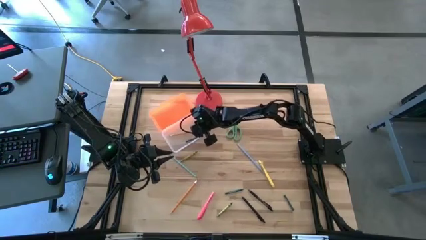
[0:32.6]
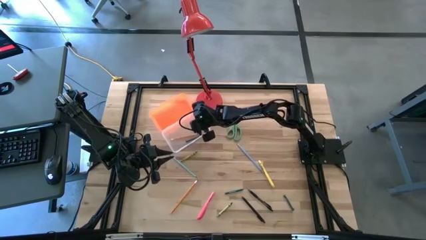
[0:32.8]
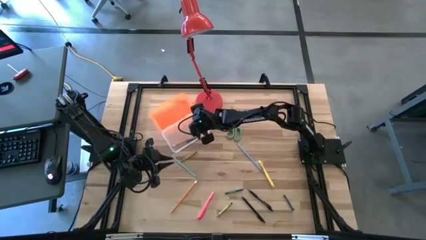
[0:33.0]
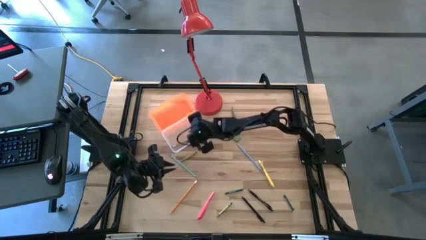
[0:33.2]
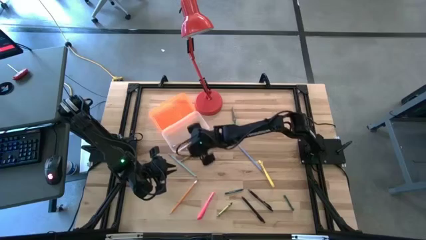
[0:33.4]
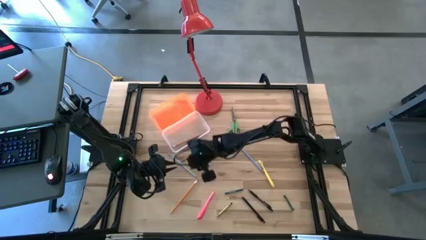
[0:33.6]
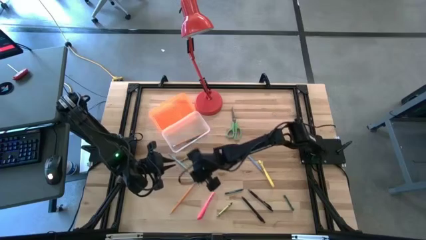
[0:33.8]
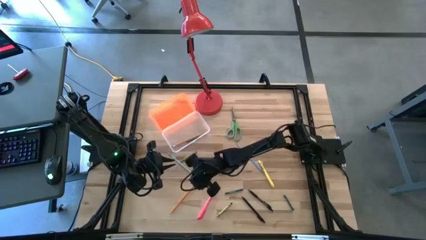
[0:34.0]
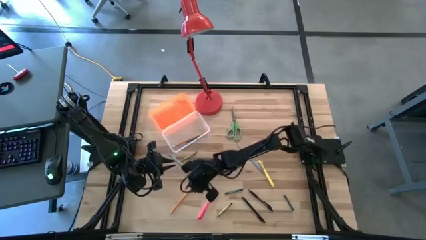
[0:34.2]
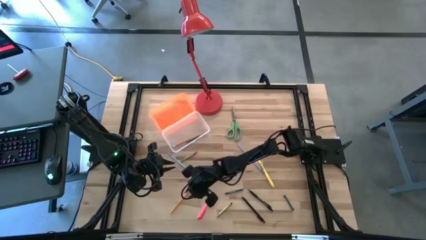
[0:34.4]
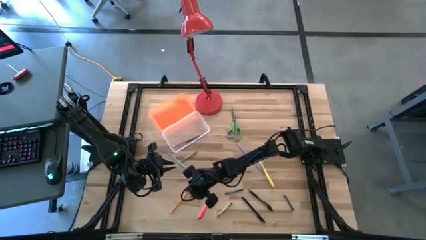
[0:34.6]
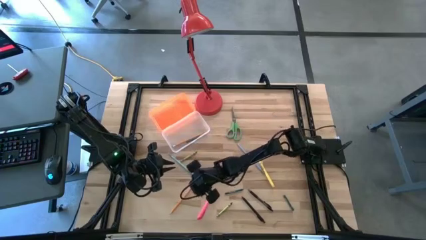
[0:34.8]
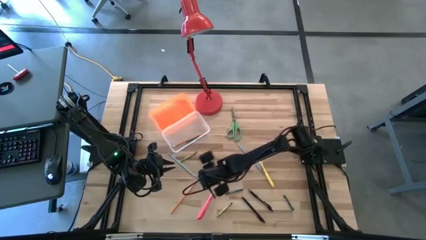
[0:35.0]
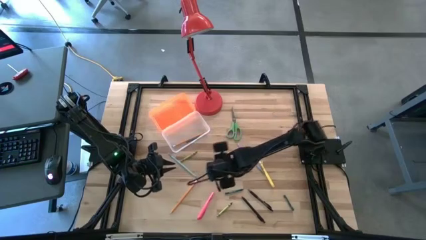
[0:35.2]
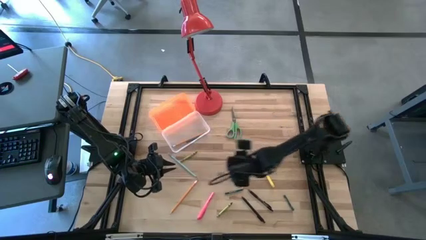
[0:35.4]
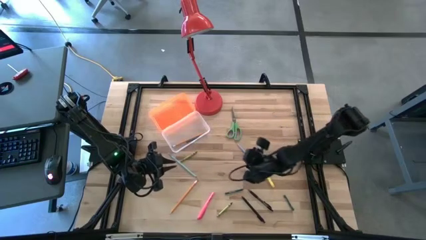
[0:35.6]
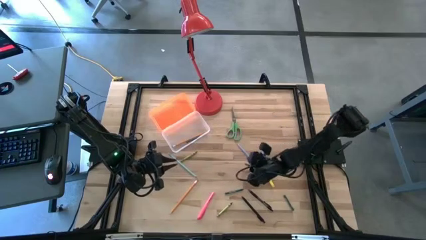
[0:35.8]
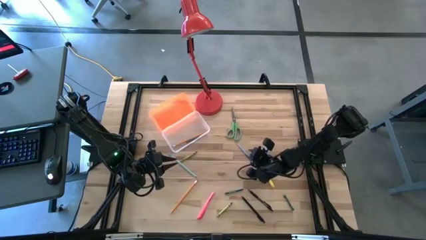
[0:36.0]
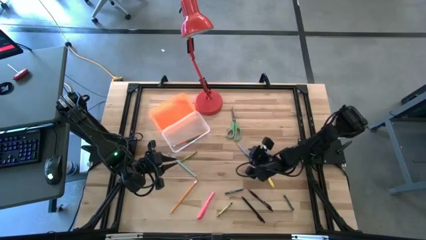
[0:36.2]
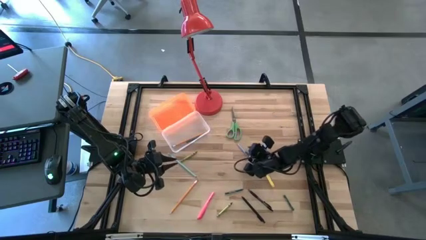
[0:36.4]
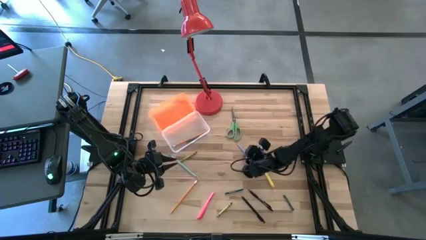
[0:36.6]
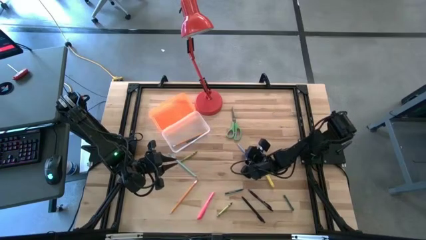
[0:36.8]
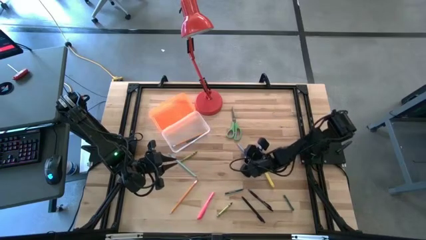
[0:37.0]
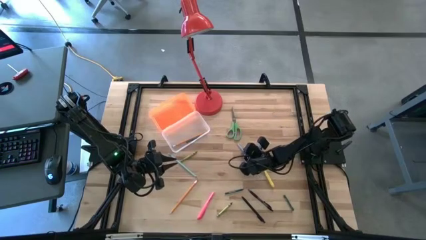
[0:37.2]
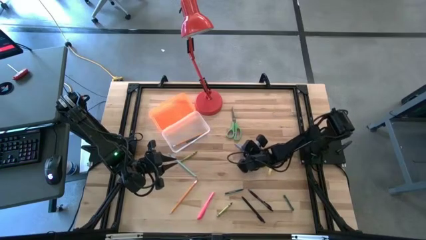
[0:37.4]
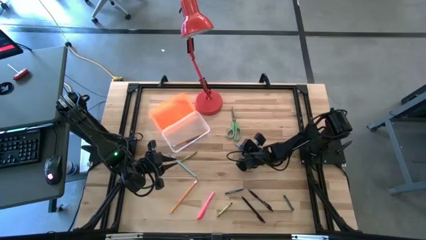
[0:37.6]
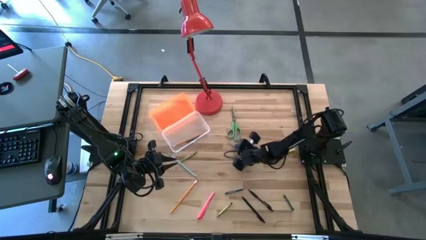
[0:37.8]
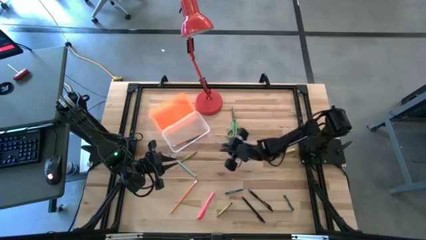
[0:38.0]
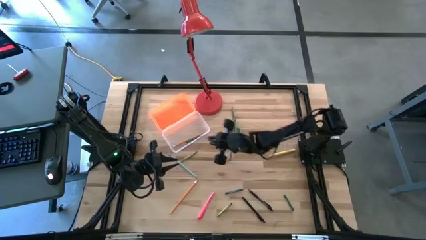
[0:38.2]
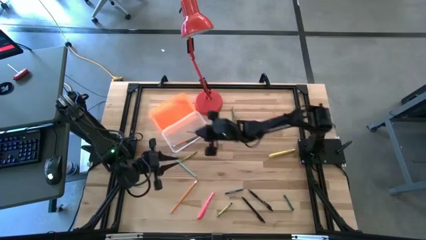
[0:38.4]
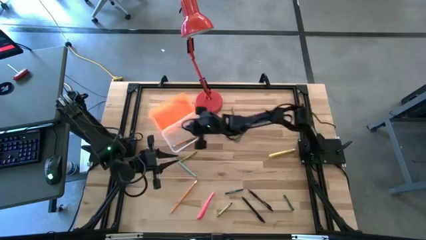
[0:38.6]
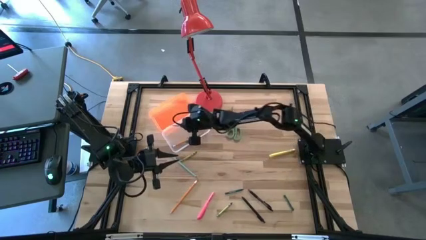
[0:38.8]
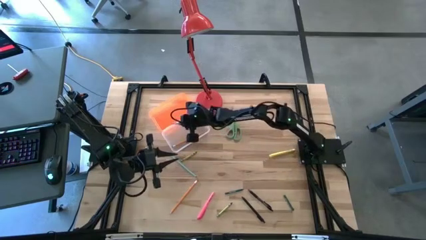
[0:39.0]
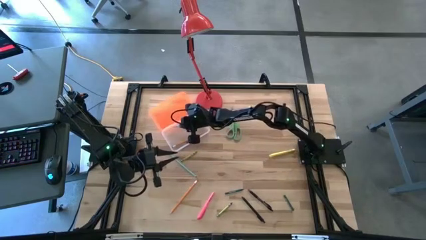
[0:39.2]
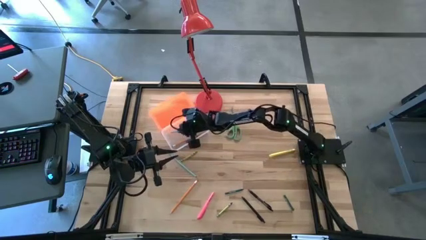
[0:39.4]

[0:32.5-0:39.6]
Task: Pick & place school supplies into a supply box
Put the blue pencil into the orange supply box

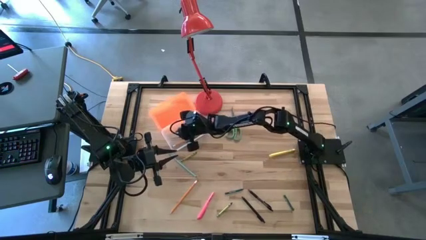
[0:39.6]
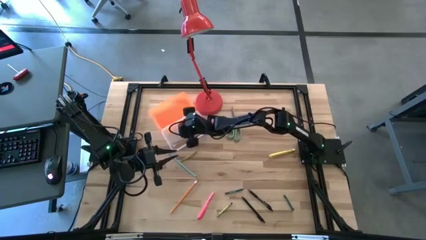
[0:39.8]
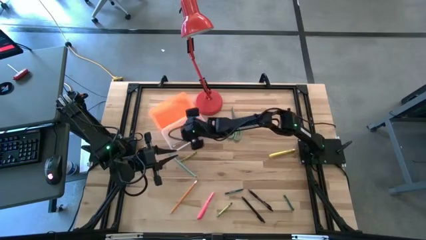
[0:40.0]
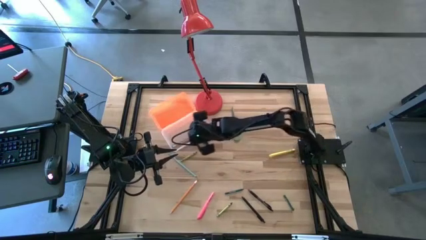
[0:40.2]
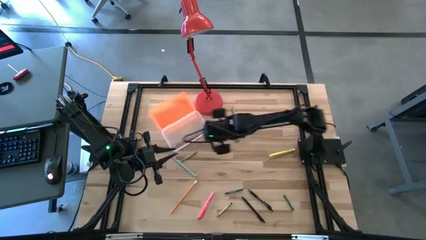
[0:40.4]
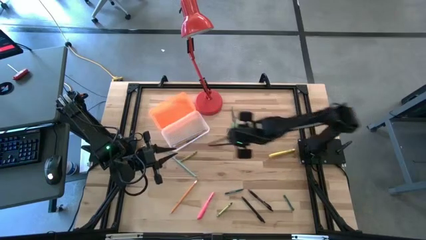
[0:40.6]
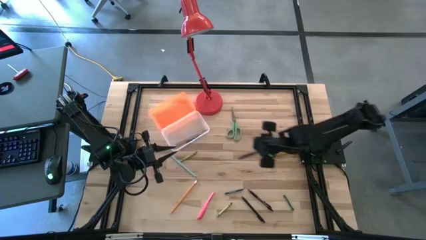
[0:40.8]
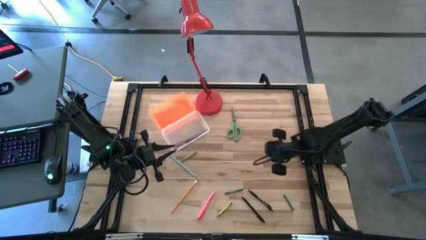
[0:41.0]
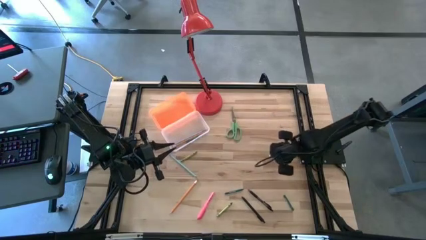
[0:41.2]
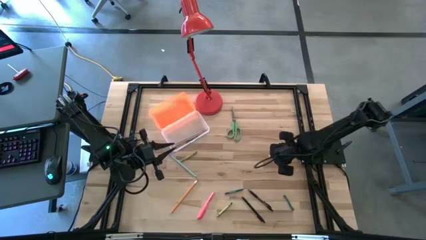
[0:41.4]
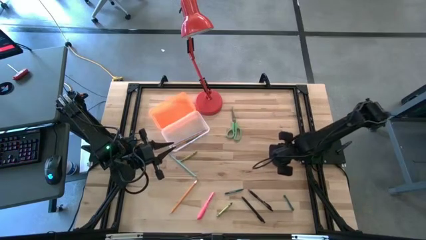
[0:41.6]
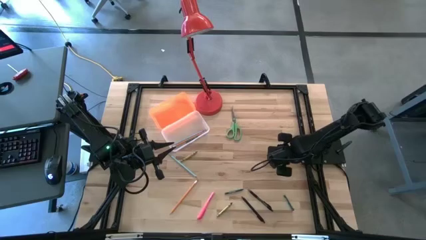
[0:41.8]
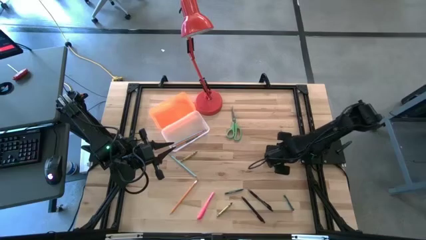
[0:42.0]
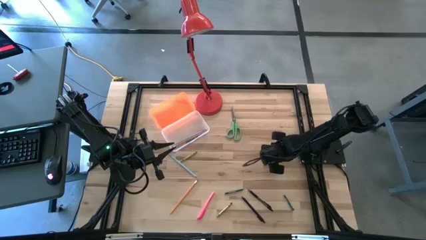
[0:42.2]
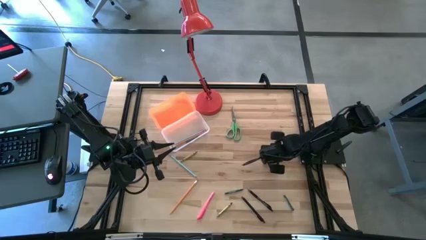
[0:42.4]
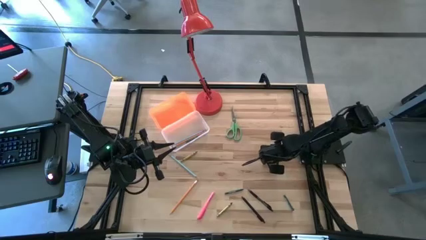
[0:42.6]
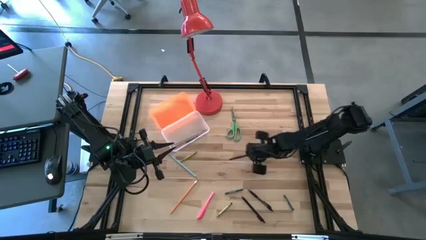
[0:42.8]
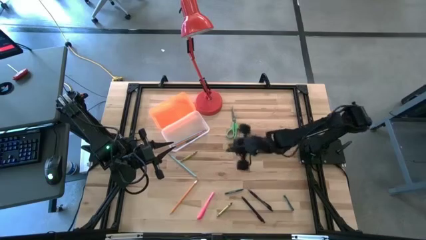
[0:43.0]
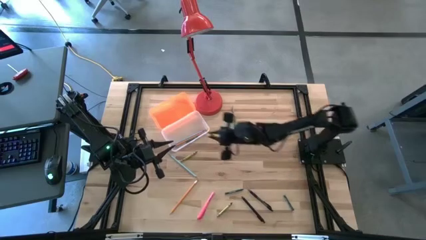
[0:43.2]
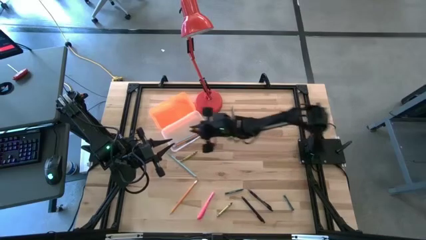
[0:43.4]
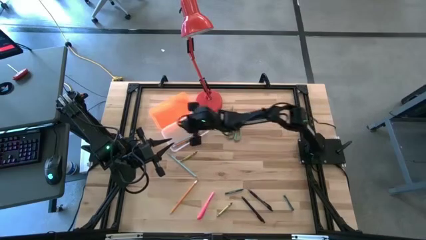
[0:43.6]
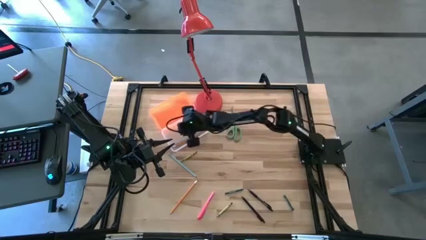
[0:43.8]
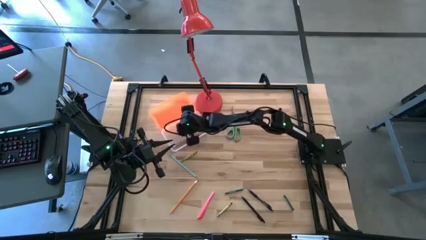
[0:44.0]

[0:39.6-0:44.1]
Put the yellow pen into the orange supply box

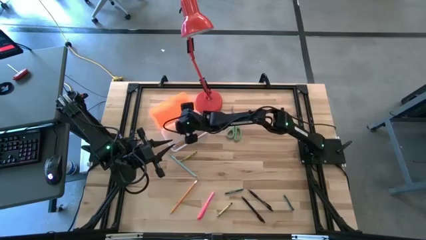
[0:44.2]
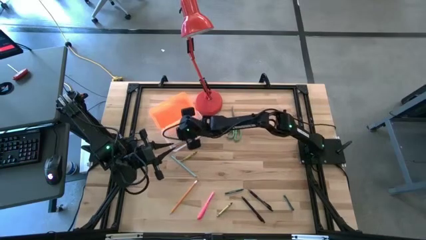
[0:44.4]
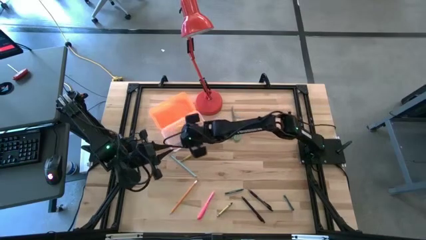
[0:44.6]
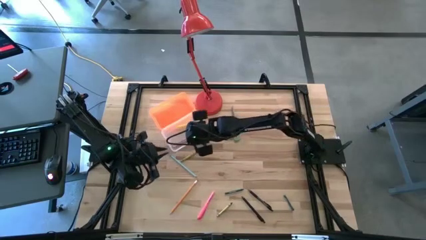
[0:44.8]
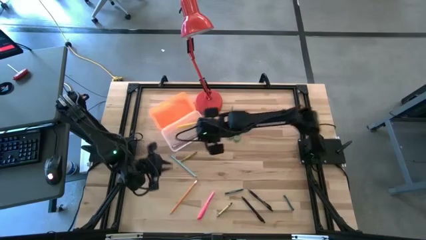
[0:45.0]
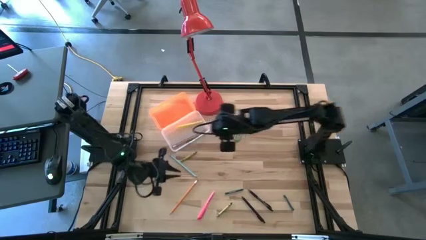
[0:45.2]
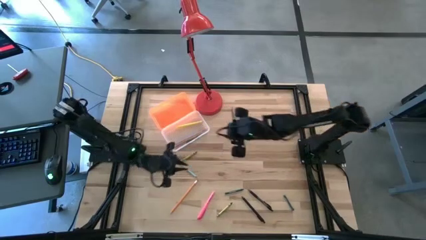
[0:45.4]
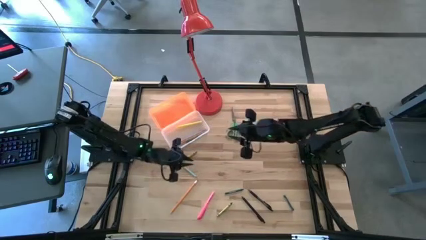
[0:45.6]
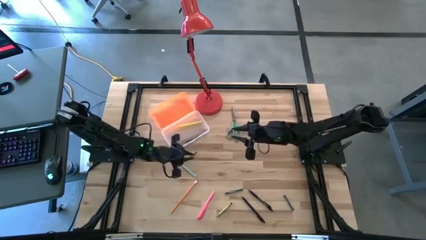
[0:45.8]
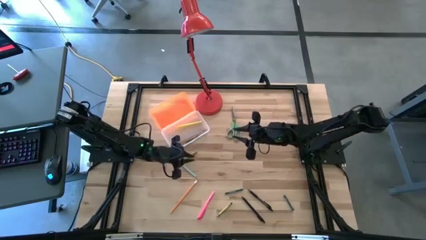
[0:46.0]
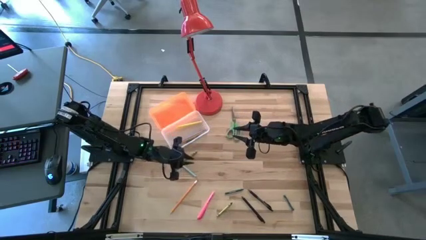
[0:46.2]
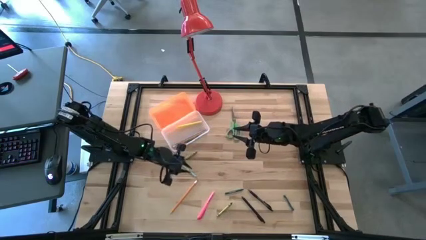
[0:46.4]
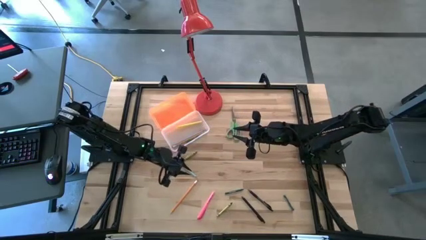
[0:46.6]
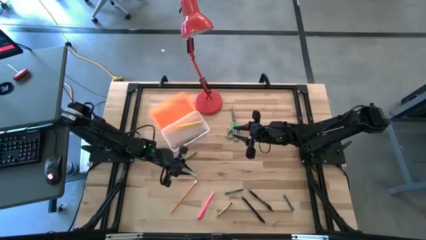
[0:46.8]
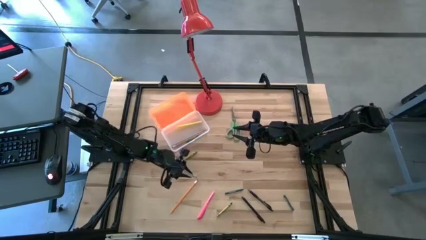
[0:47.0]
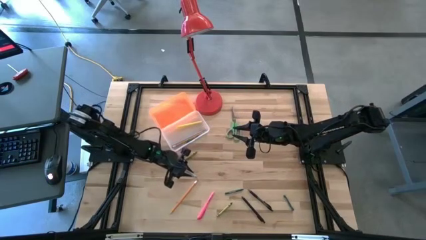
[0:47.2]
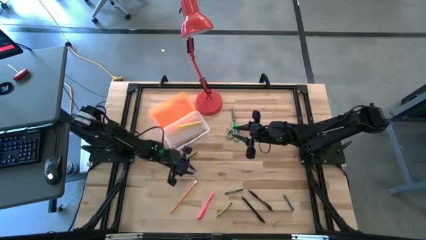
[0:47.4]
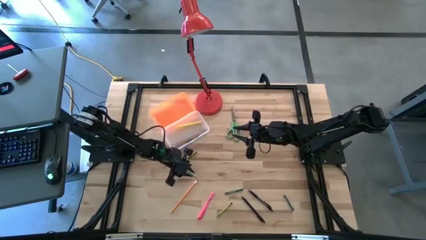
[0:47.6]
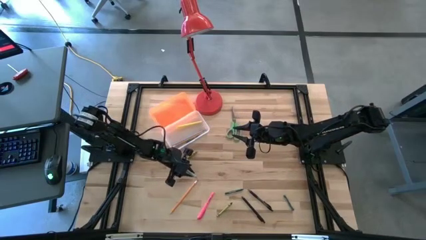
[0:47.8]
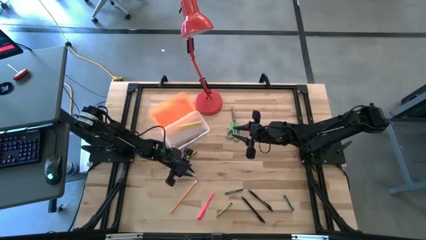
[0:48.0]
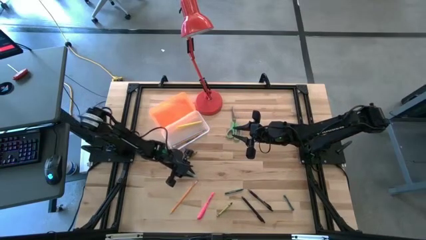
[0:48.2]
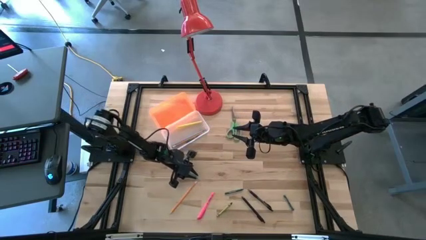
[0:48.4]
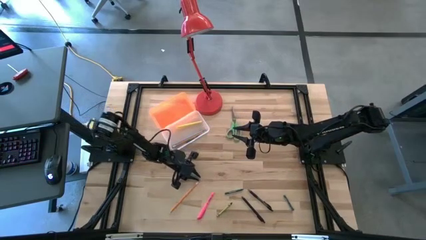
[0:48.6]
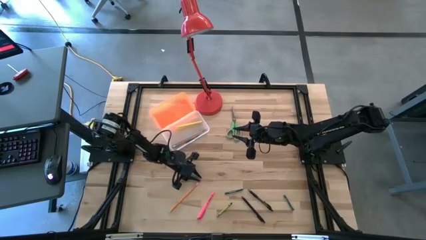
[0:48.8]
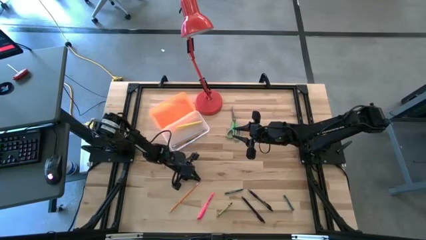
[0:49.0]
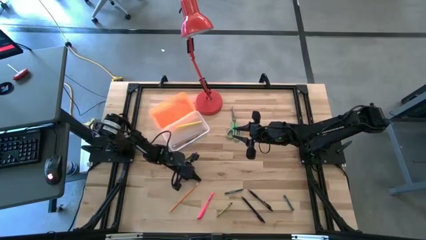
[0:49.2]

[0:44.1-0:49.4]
Put the blue pencil into the orange supply box
